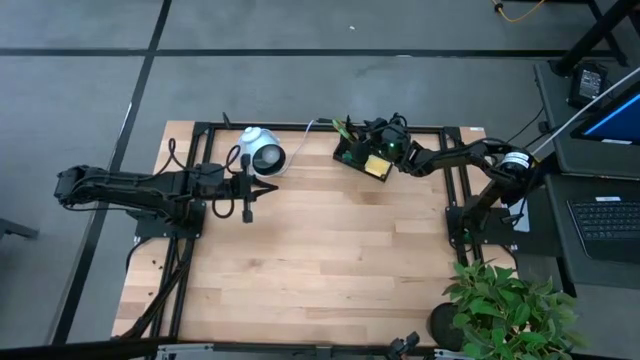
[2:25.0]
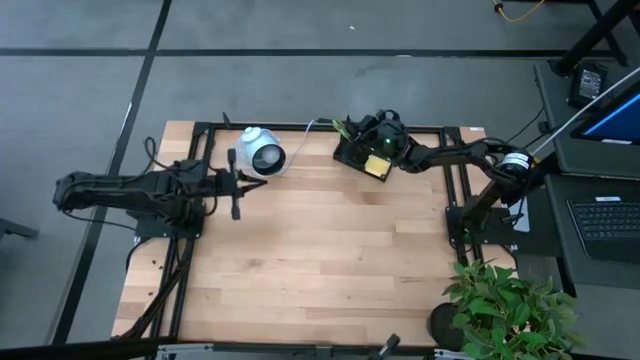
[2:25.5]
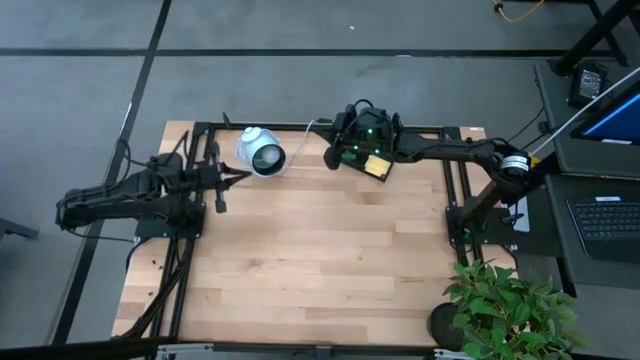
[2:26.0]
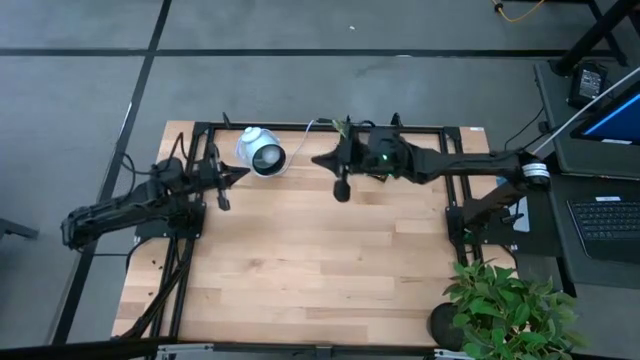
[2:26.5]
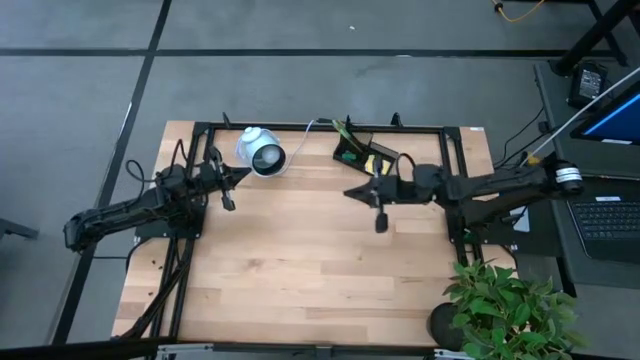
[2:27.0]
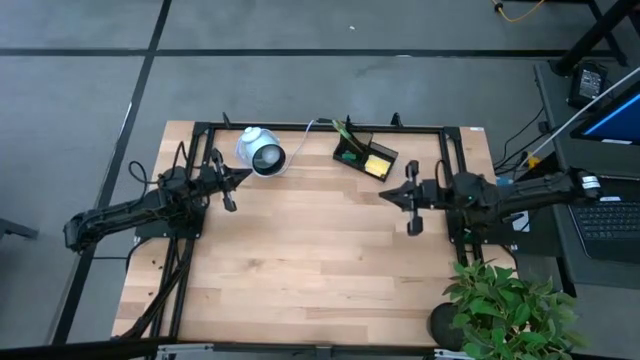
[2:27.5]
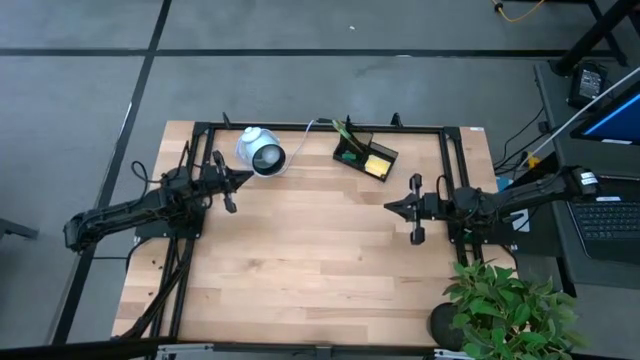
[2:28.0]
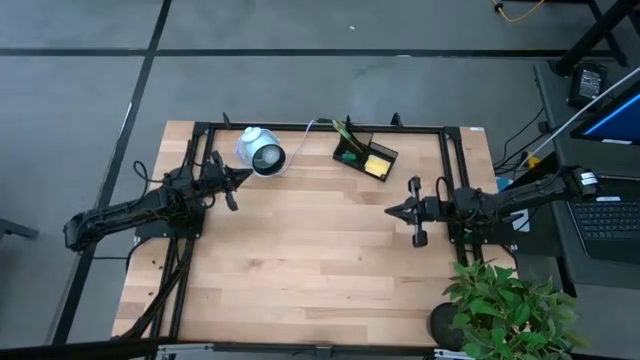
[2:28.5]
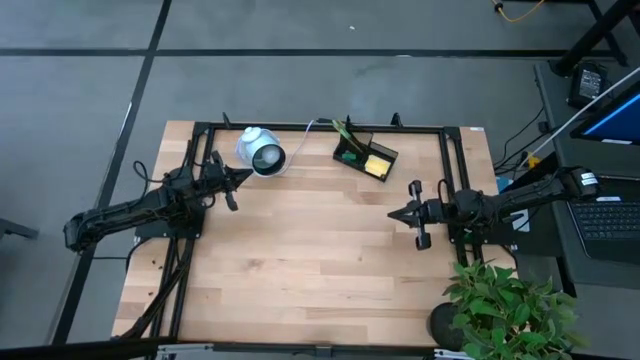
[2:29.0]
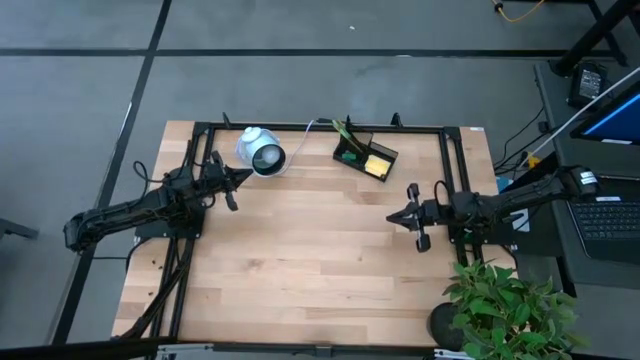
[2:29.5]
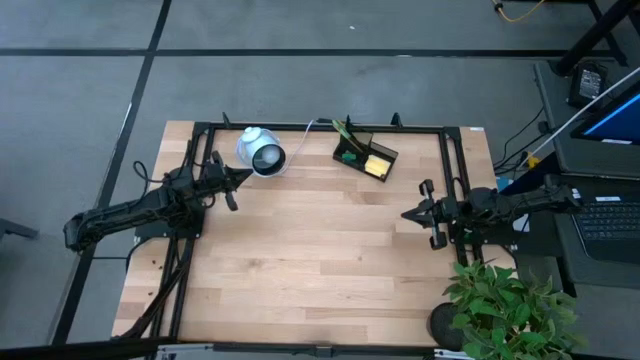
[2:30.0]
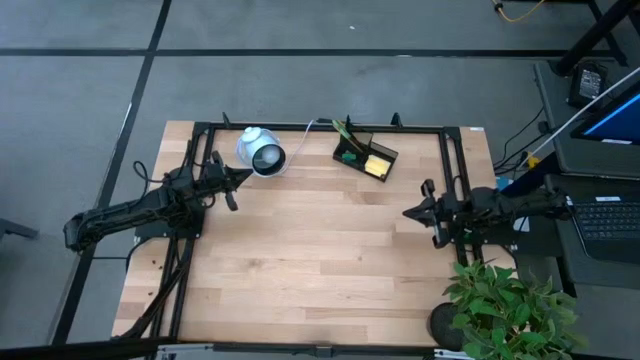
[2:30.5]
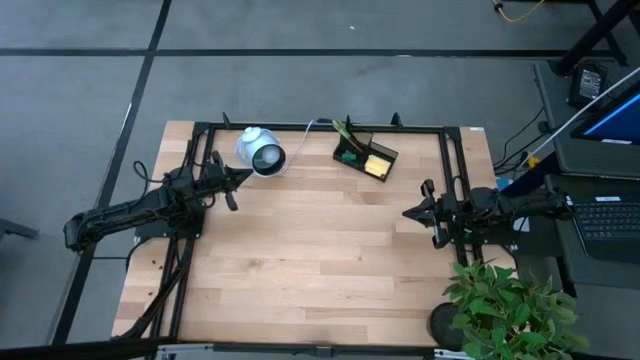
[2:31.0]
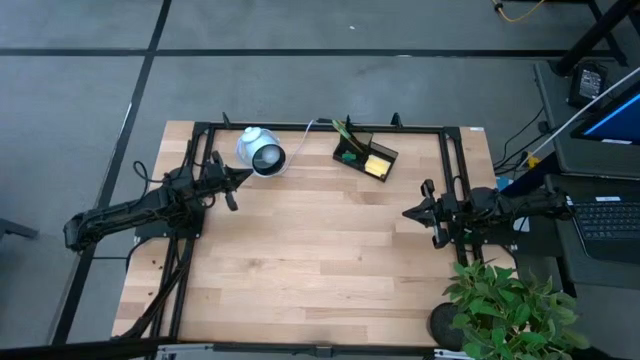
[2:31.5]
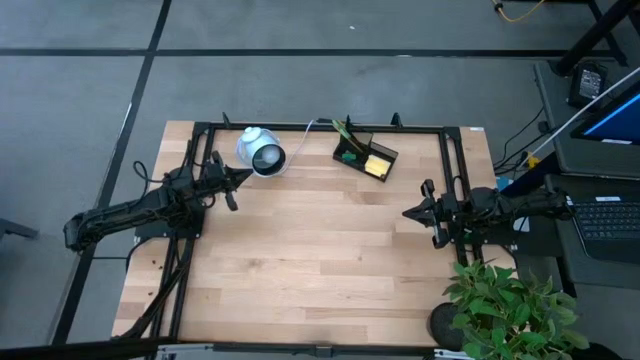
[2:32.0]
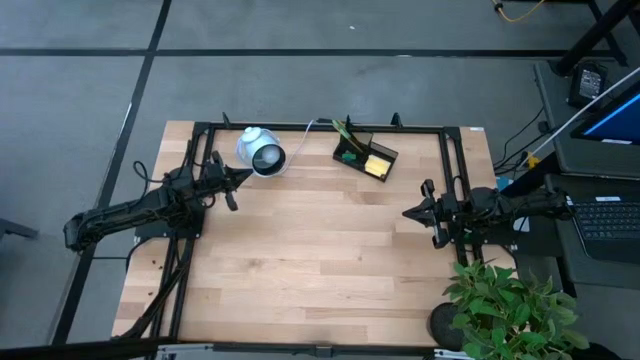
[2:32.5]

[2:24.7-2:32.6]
Task: Pick and place office supplies into organizer
Return to Home Position

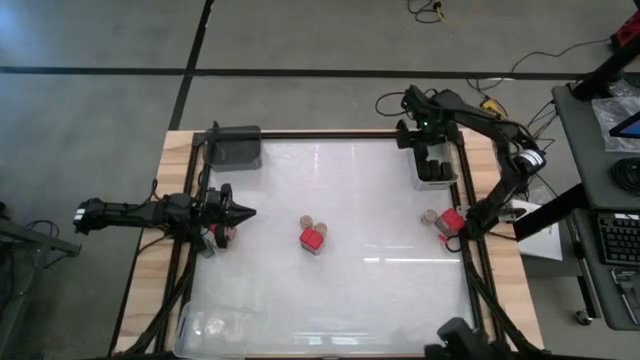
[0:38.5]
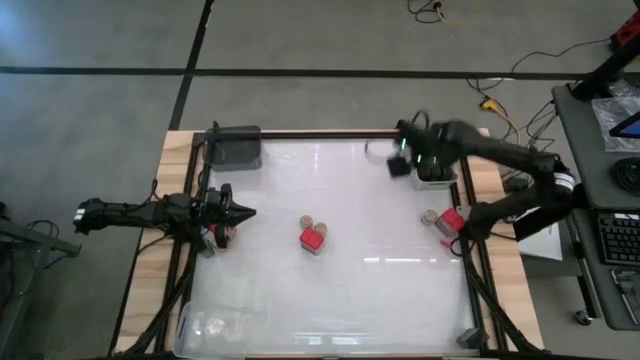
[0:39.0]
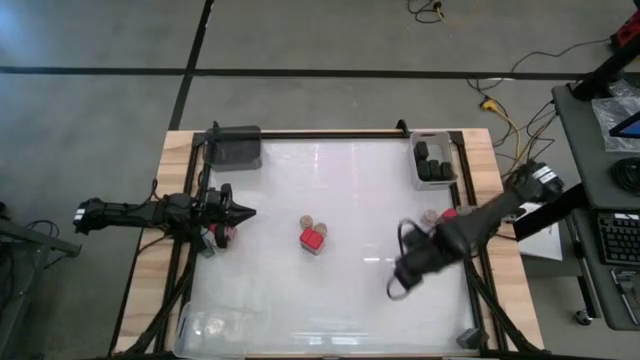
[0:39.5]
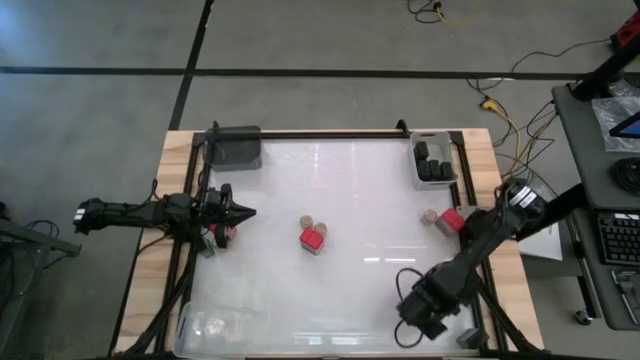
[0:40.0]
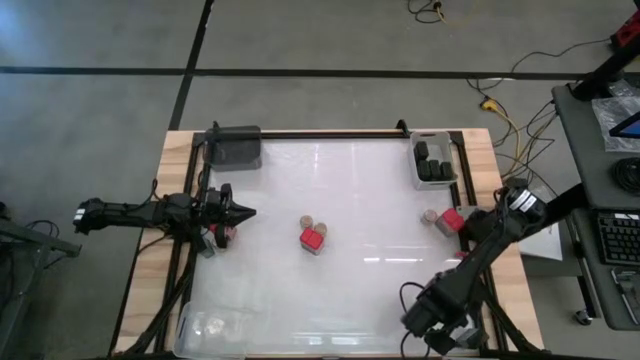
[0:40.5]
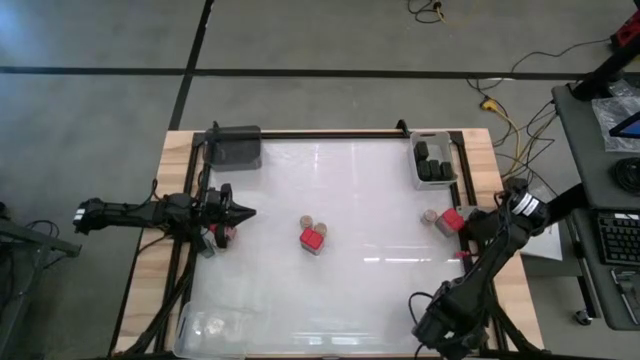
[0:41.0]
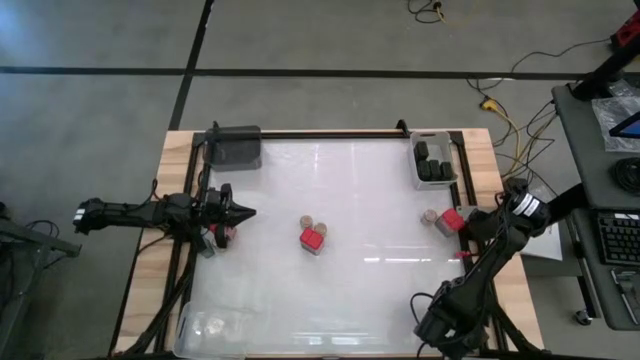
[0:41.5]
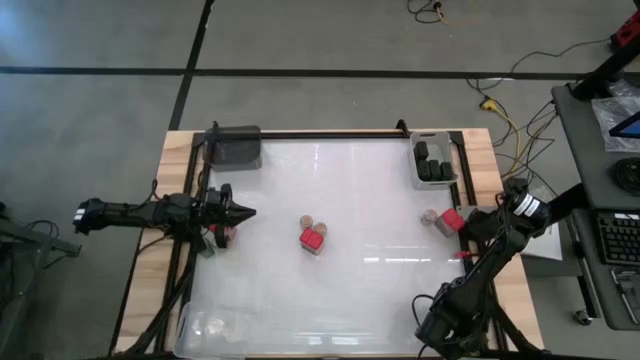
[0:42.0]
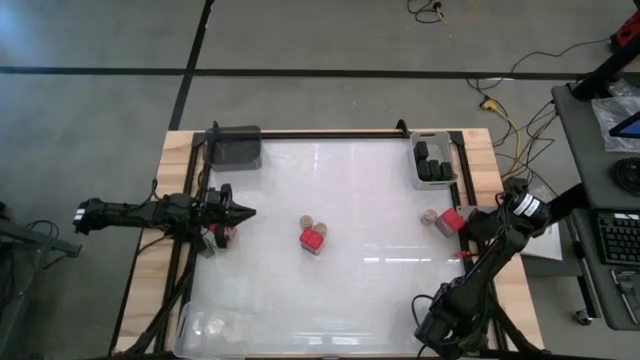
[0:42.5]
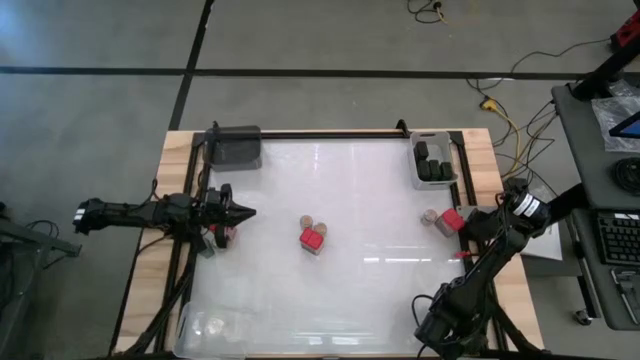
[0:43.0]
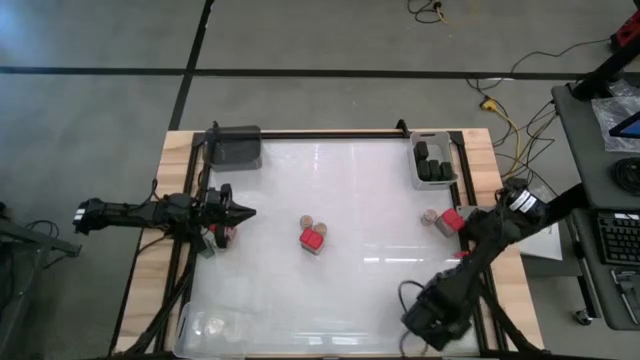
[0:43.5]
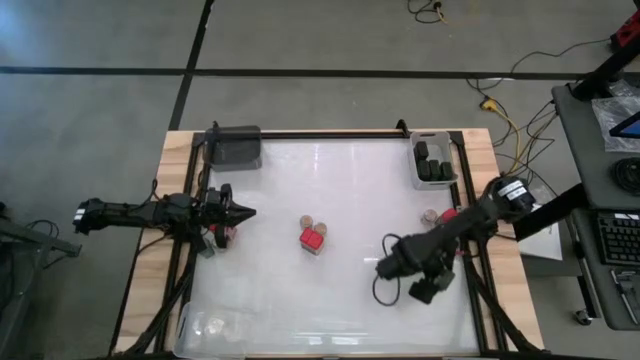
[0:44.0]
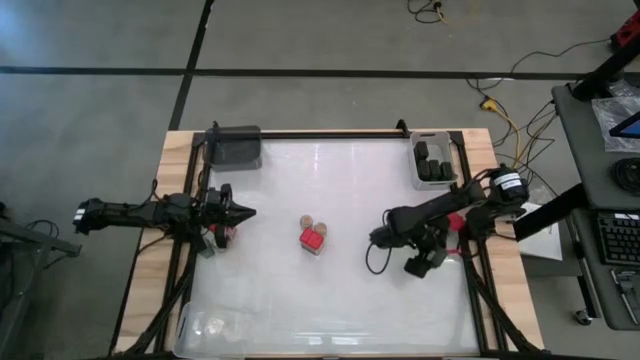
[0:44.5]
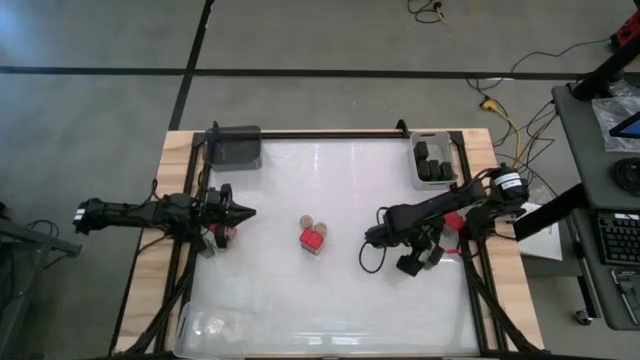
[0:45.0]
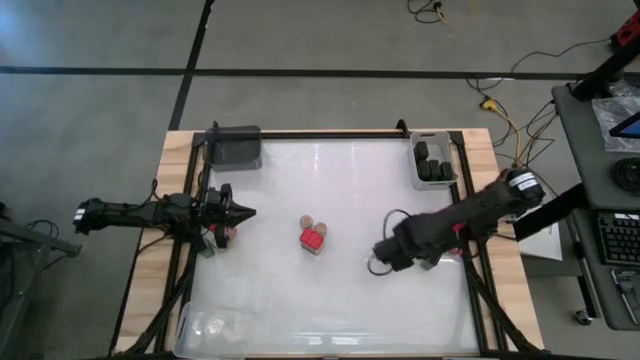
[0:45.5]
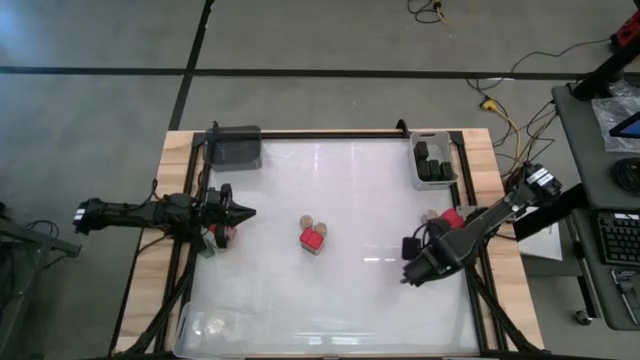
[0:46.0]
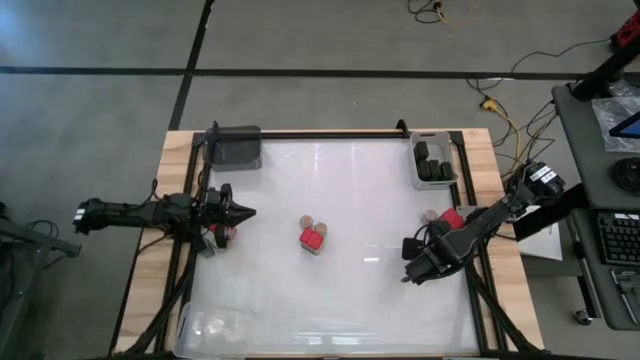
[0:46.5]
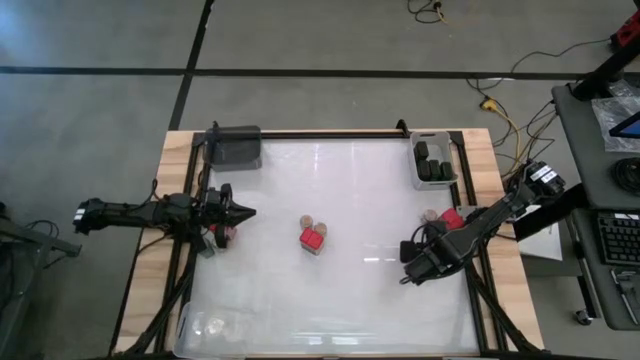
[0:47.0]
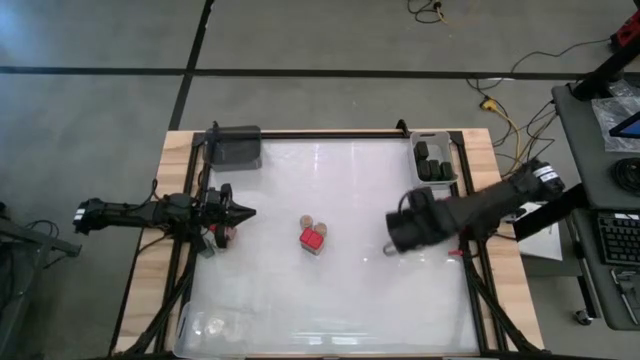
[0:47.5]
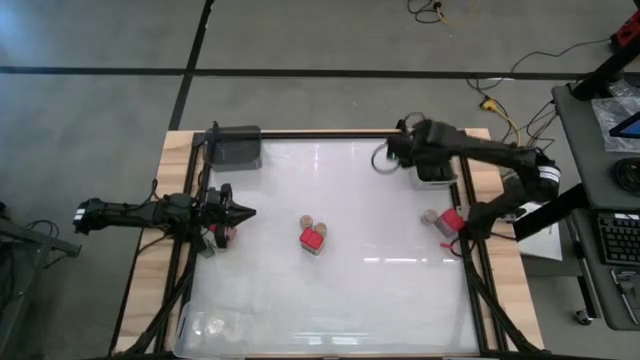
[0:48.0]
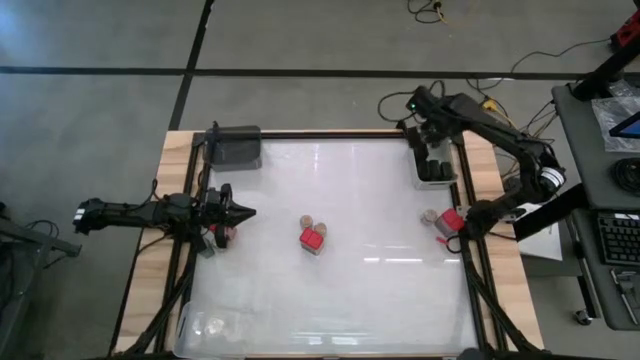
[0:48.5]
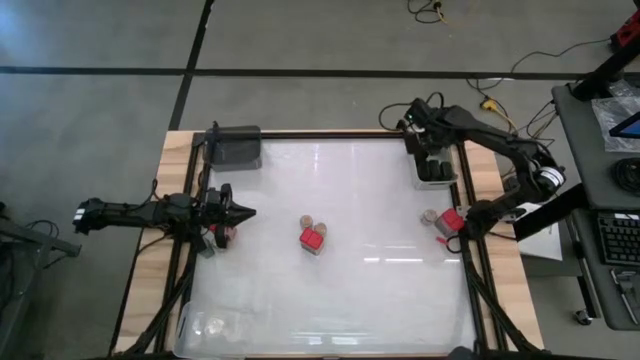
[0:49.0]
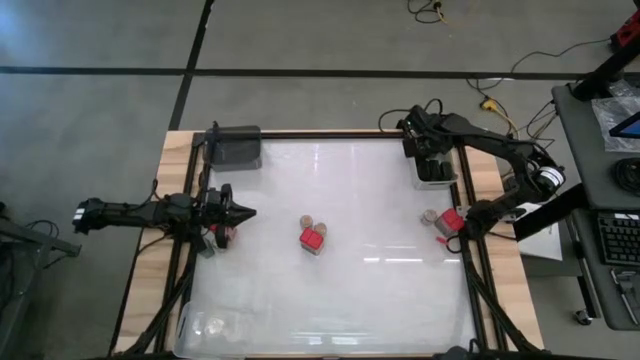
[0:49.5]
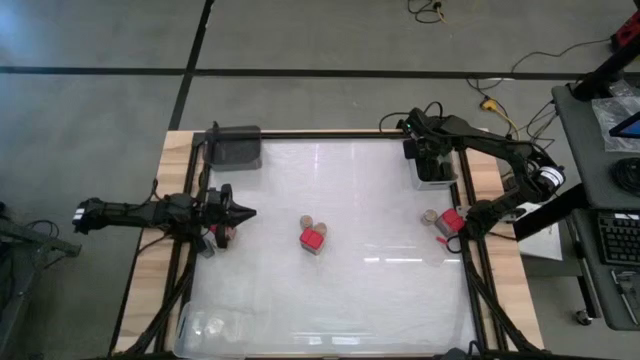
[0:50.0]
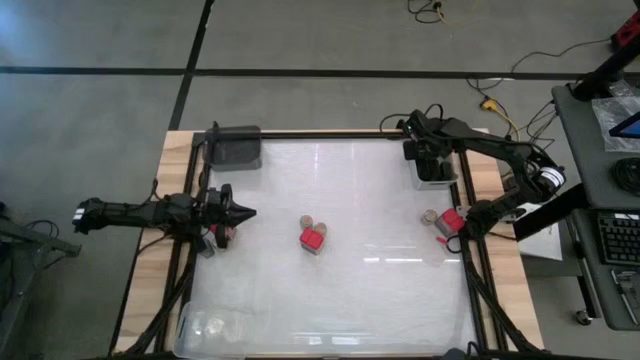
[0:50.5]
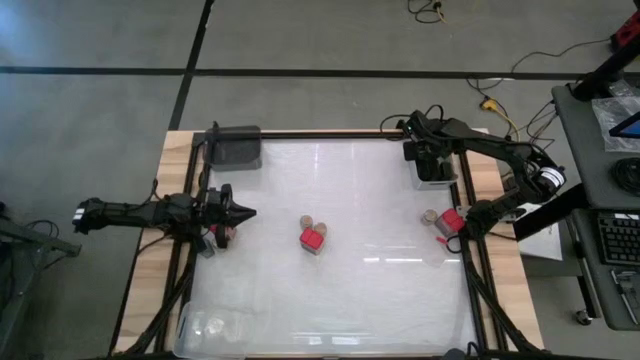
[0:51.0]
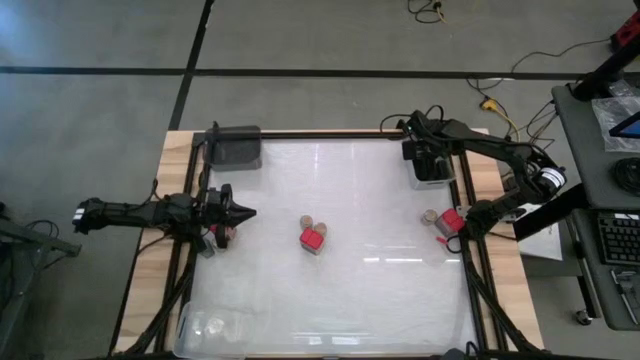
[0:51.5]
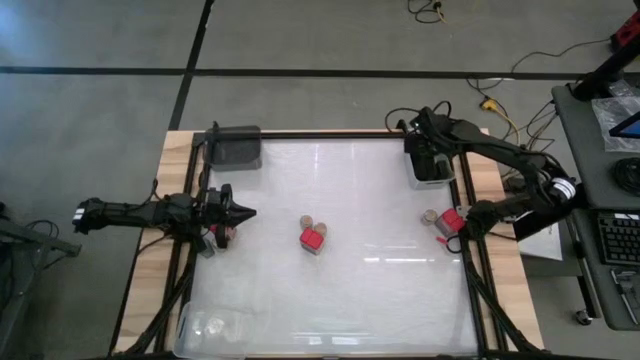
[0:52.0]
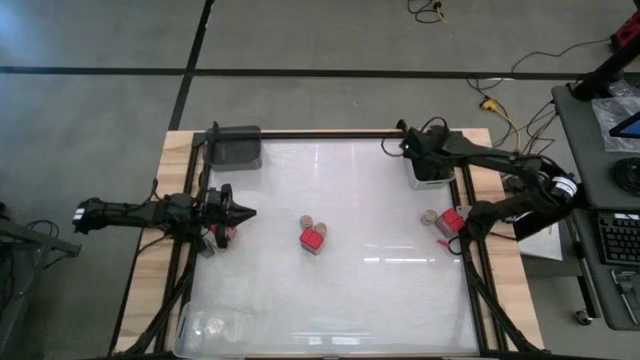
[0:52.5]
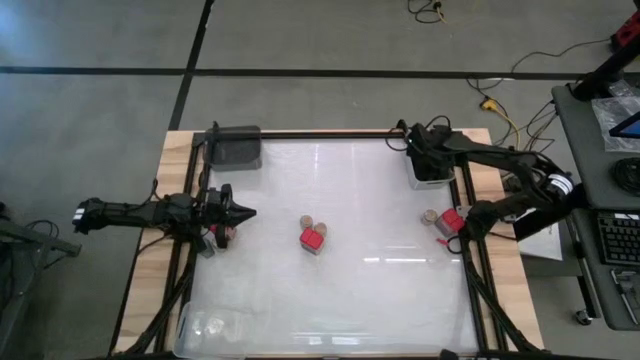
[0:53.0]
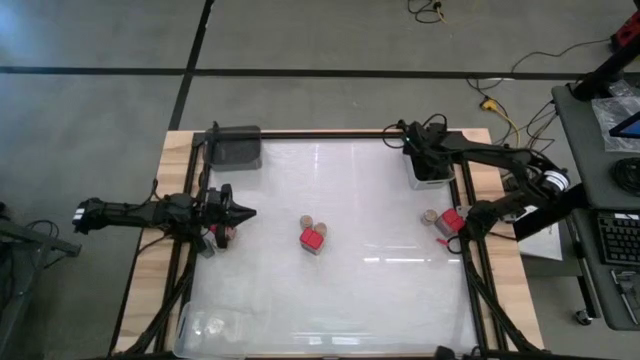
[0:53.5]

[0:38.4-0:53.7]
Task: Sort spices by type
Put the black seasoning can into the gray bin
